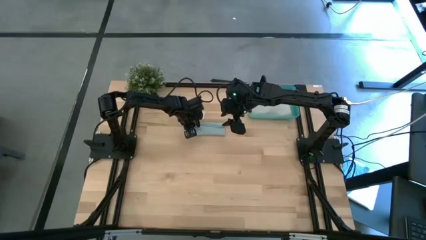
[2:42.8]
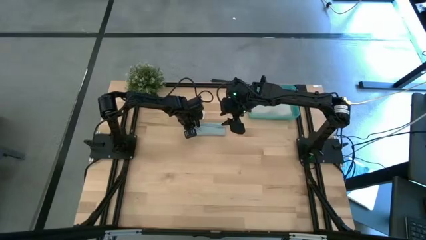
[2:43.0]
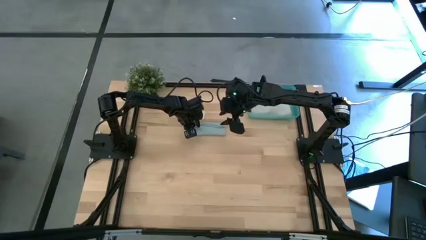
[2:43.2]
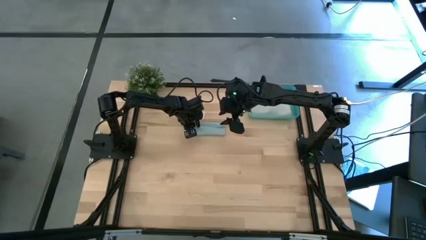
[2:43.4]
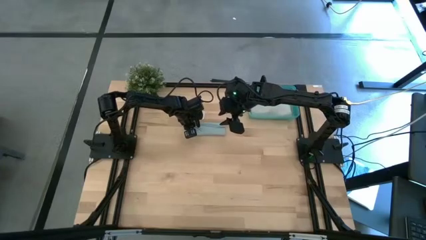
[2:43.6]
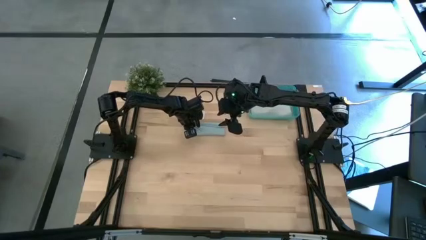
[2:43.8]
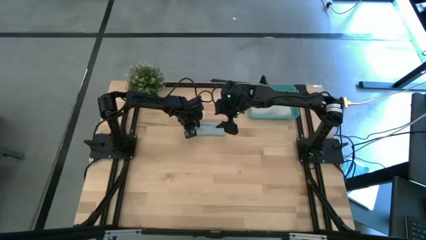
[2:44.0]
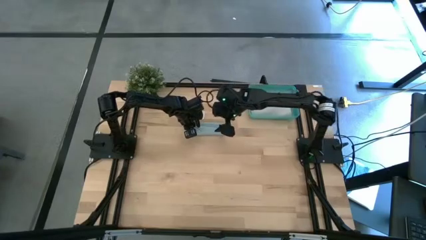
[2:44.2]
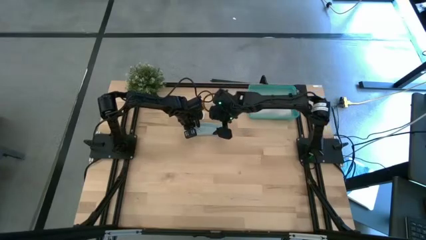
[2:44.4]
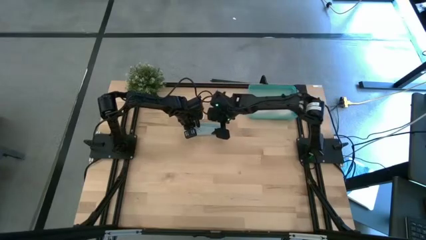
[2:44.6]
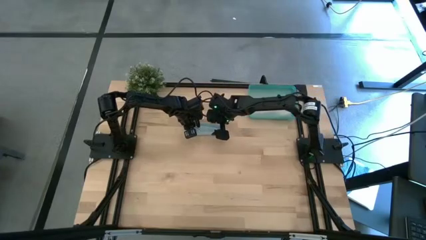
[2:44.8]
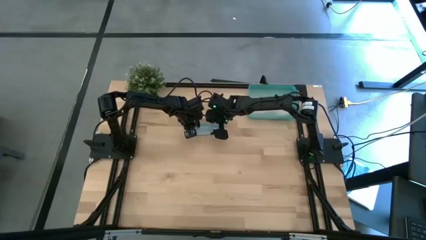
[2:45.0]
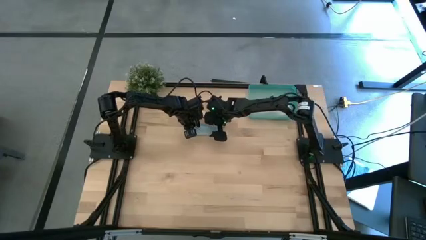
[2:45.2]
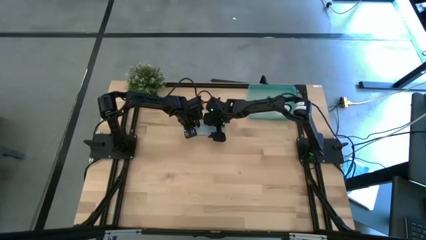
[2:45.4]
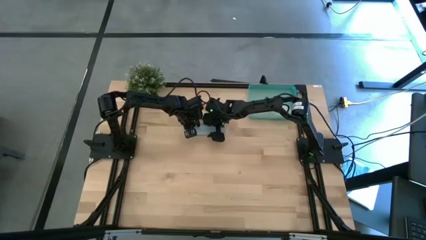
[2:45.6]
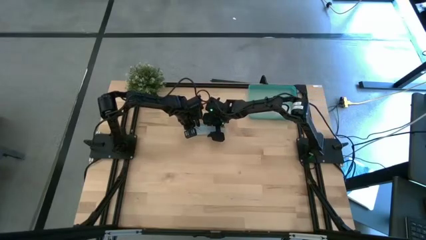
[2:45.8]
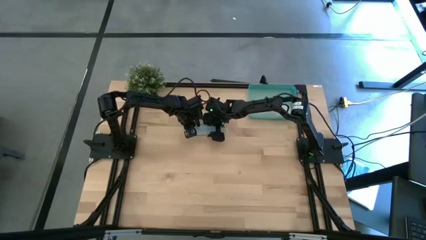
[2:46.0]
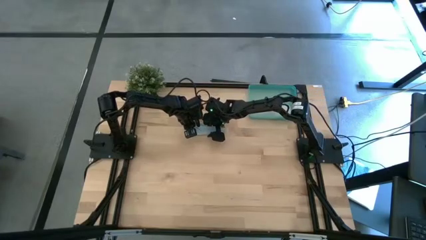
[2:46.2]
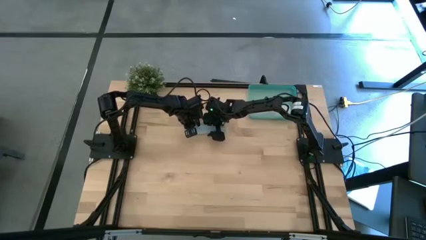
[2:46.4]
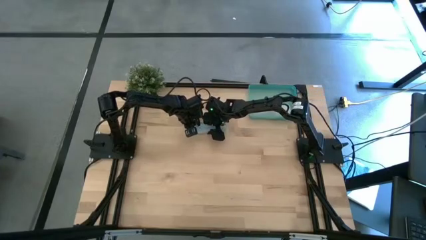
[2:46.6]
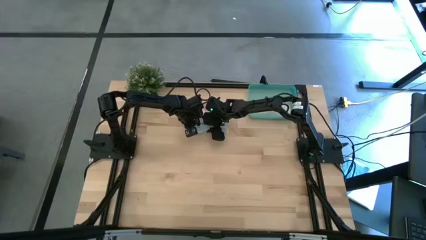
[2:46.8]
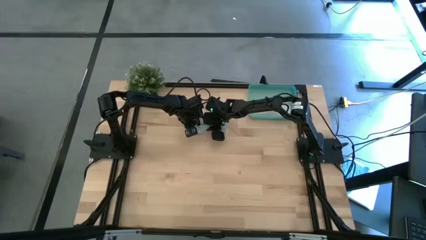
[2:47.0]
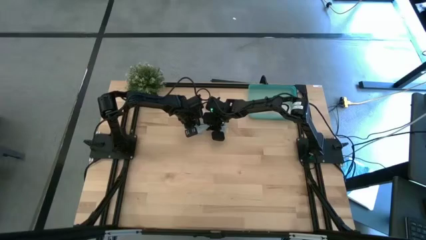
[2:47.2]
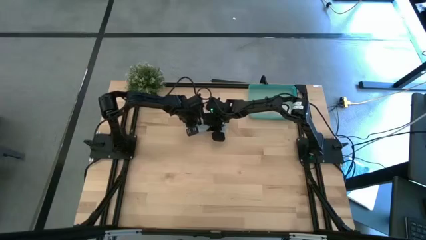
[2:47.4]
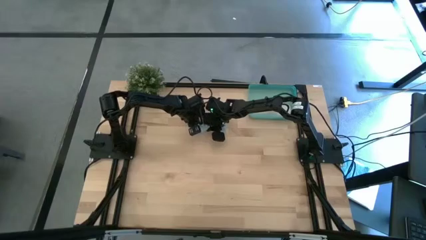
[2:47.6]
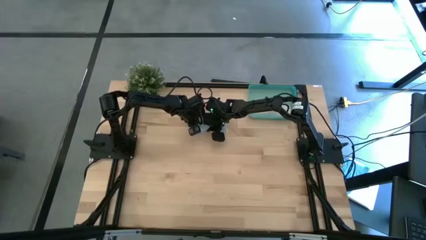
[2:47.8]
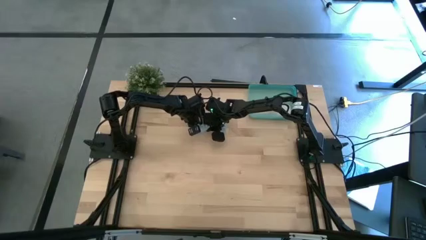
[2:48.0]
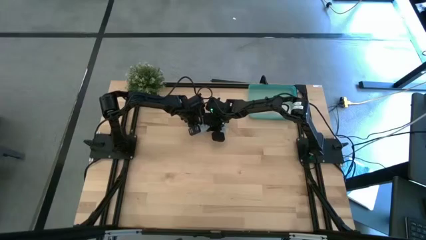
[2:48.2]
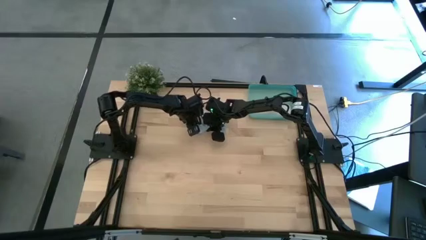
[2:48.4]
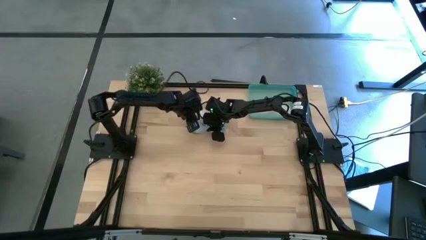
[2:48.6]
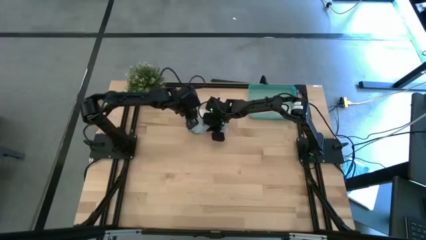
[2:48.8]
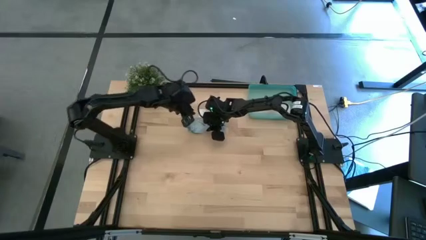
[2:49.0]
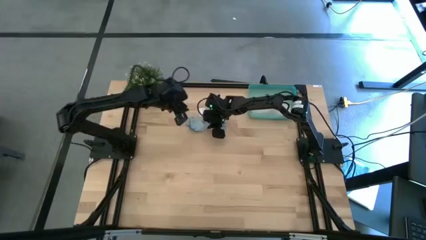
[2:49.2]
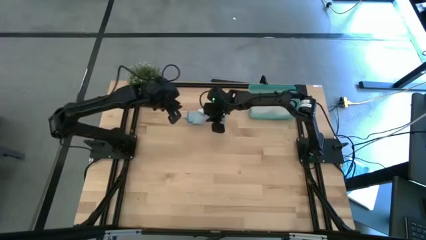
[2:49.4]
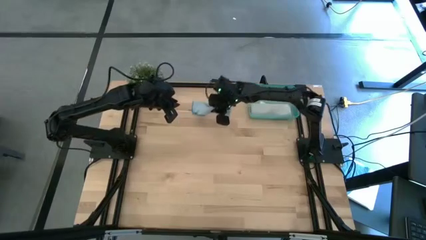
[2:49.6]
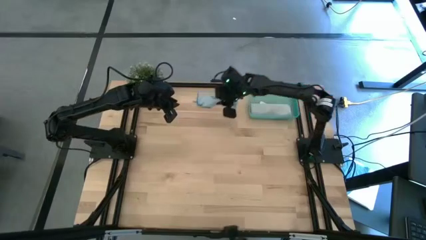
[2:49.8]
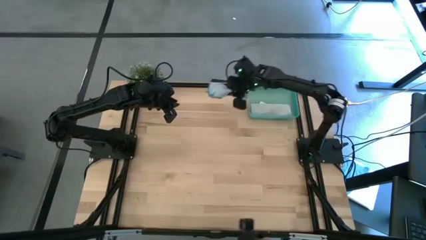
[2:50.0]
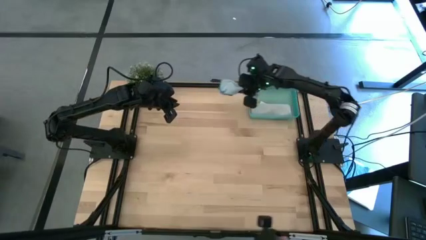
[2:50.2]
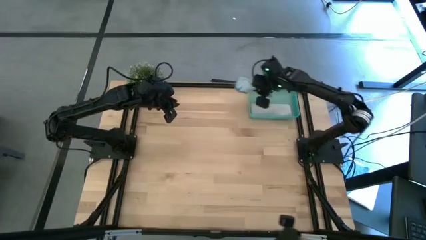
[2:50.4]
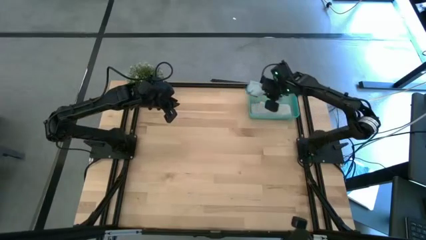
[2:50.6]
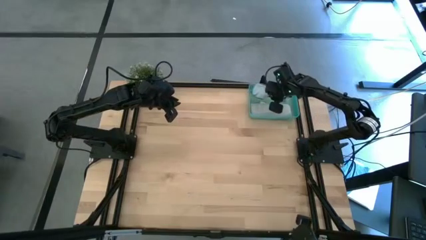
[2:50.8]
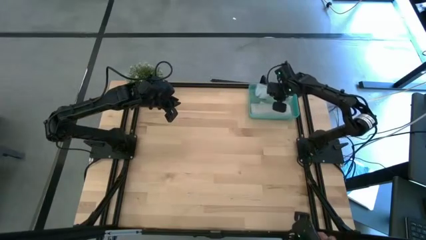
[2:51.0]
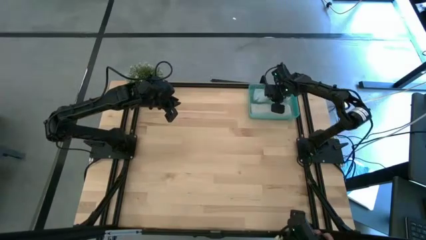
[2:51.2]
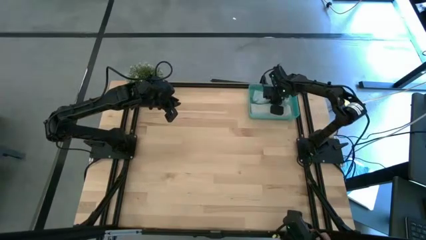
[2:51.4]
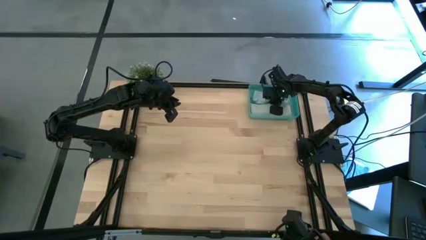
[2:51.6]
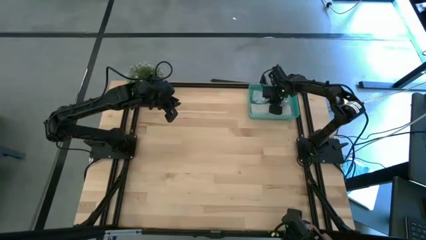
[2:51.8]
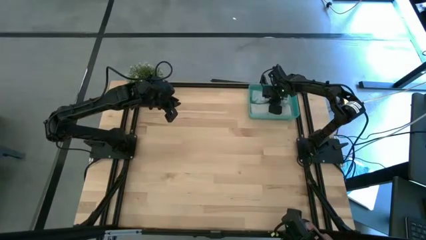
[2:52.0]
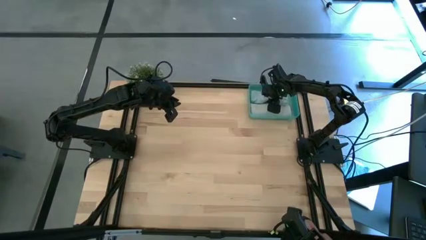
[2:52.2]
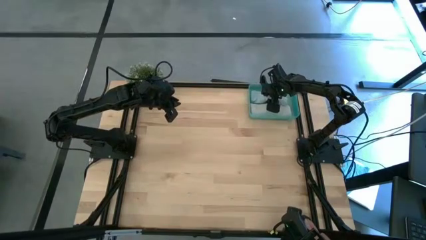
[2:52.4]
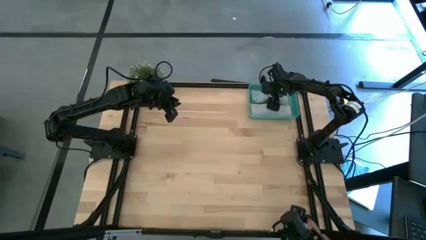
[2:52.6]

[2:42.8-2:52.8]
Task: Roll microfiber towels into tight, uniform cylinder then place into a basket
Put the blue microfiber towel into the green bin

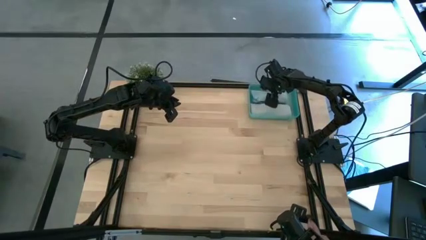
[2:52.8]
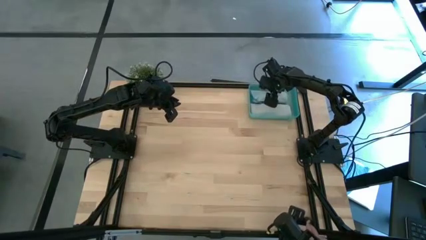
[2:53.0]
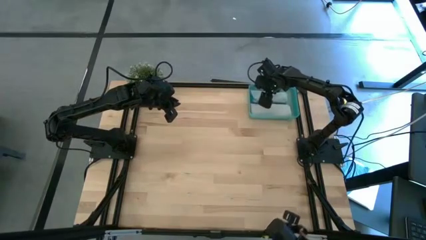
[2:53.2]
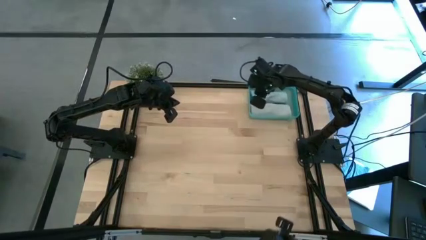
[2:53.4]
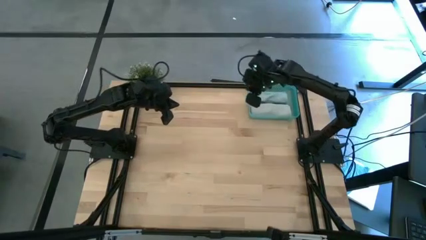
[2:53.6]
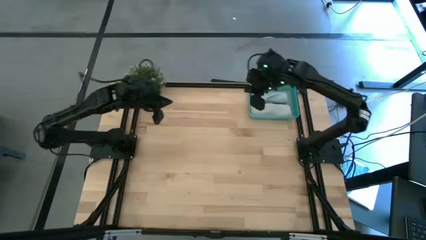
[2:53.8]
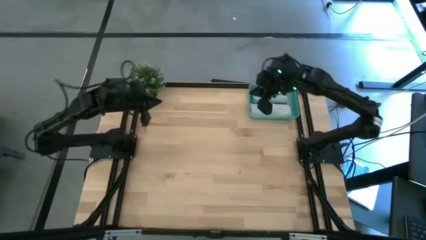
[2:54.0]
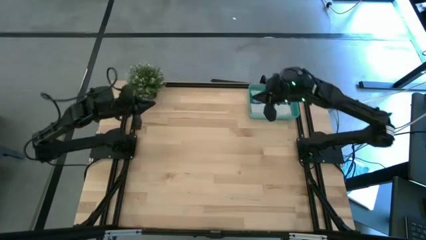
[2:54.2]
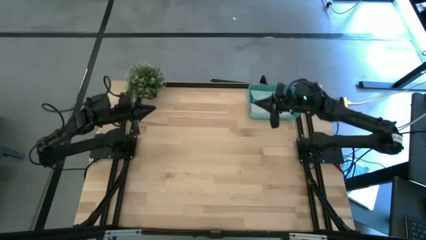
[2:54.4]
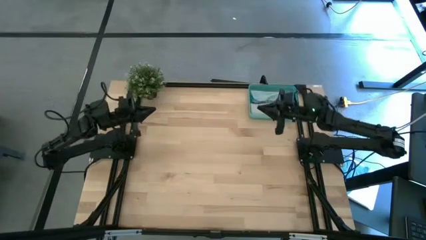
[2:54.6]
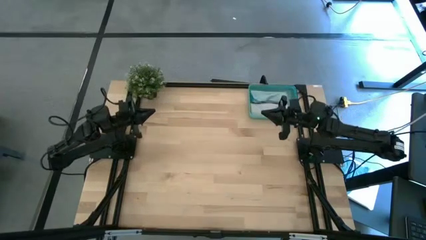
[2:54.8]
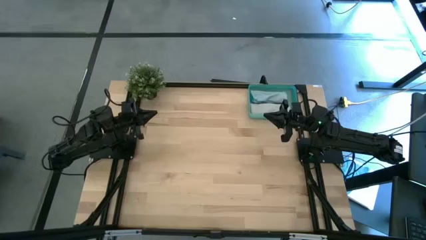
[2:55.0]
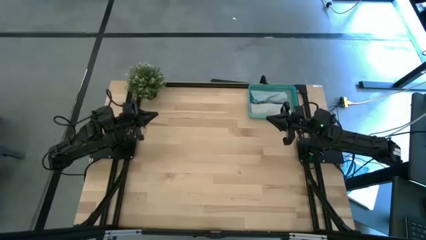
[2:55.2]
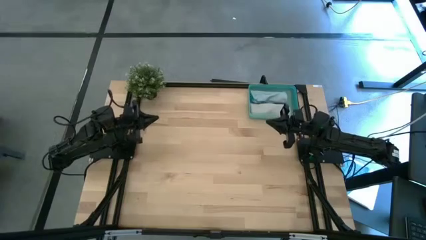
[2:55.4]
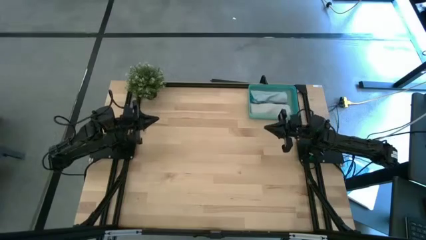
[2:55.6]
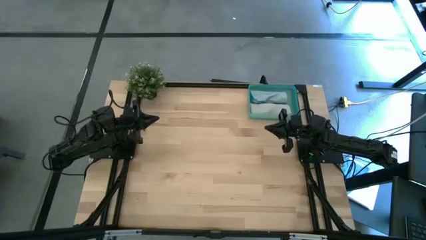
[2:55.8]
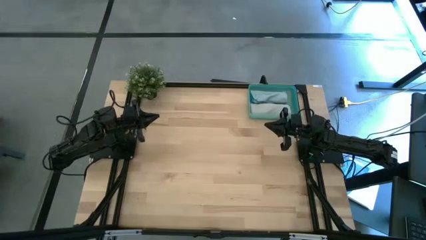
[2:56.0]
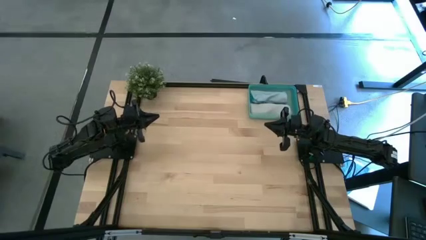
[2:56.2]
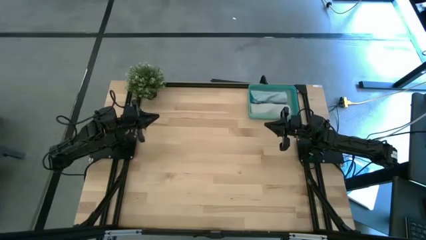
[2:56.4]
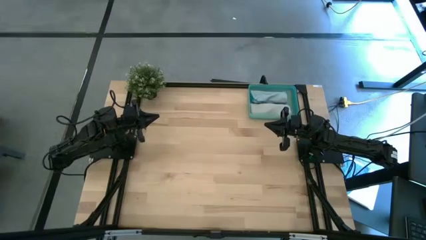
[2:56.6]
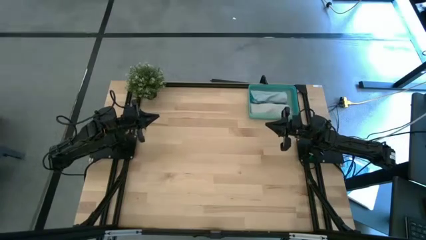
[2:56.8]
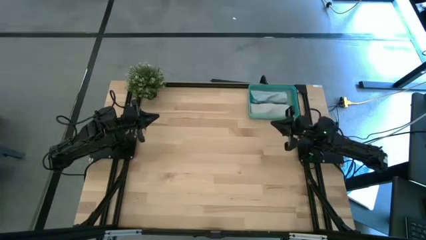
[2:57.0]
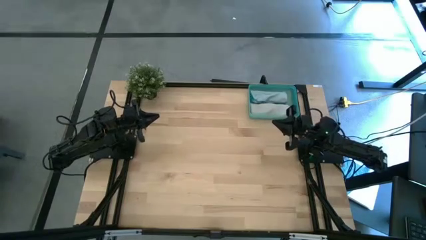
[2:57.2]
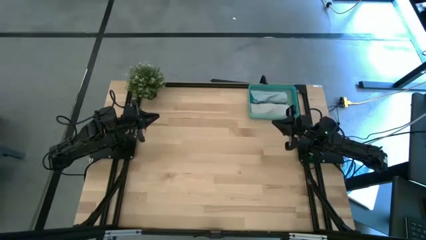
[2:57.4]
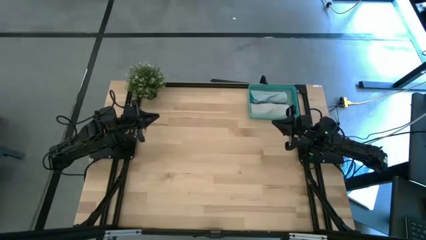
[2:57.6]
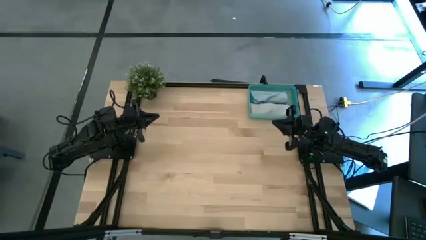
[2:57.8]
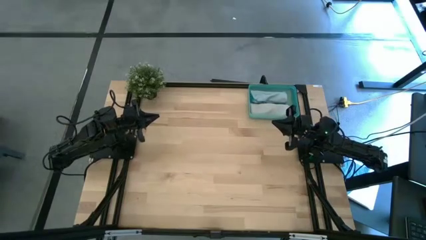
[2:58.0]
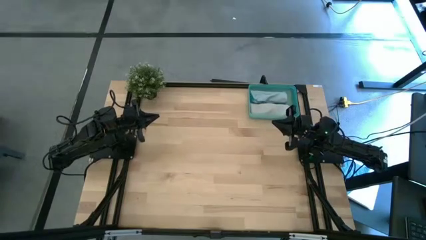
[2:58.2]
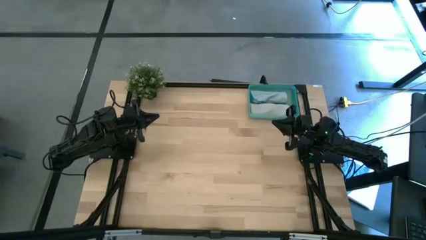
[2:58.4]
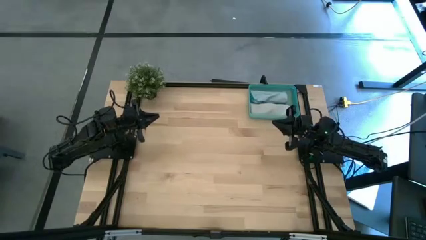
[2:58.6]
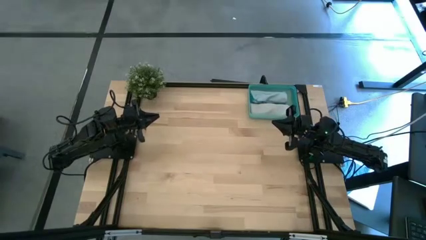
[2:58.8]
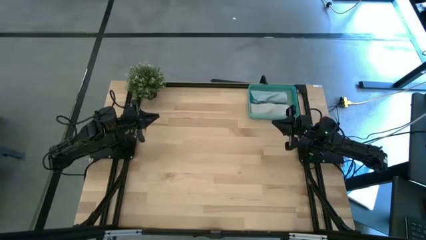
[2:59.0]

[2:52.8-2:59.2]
Return to Home Position
